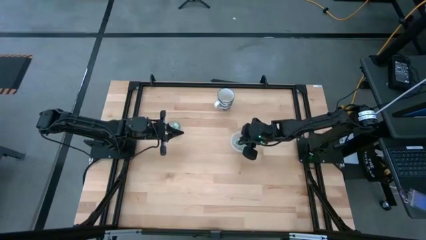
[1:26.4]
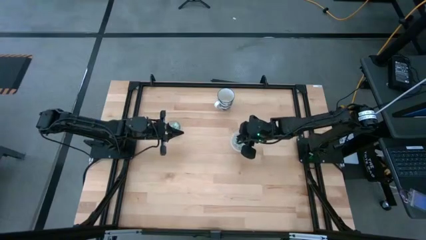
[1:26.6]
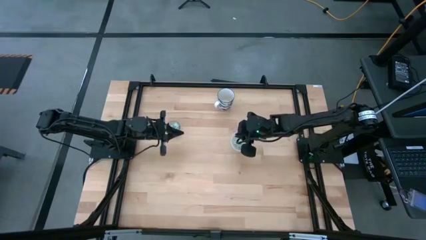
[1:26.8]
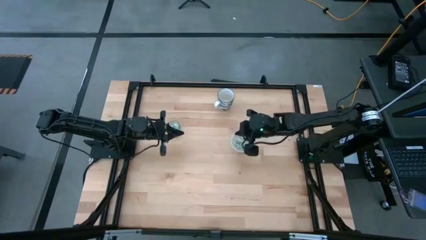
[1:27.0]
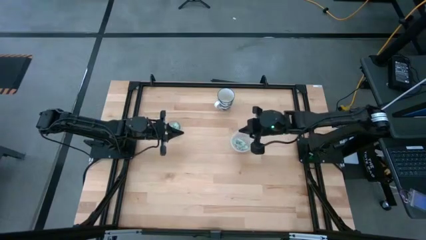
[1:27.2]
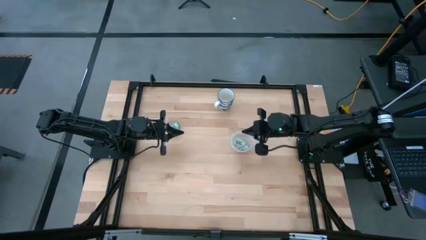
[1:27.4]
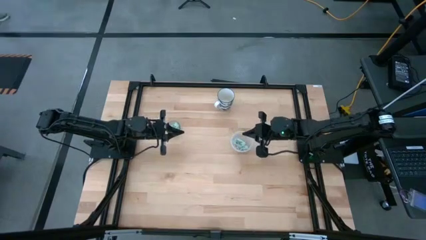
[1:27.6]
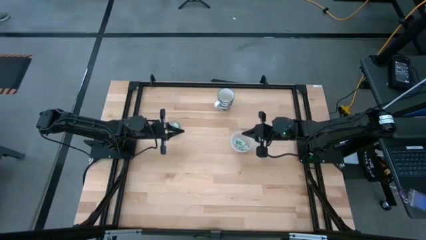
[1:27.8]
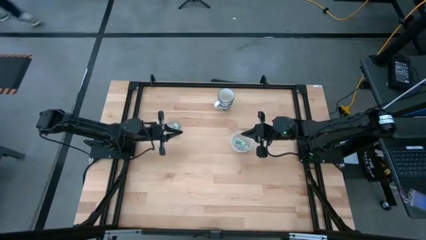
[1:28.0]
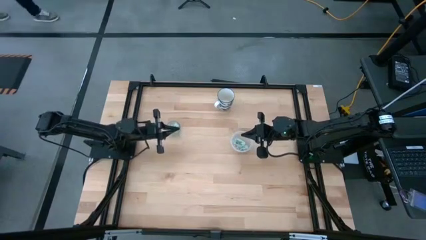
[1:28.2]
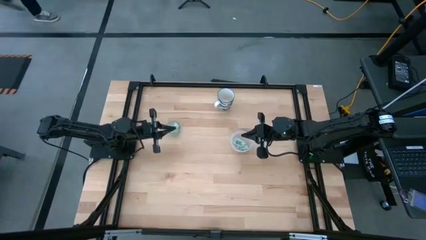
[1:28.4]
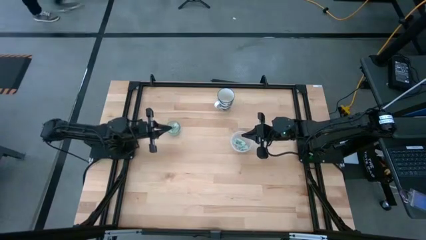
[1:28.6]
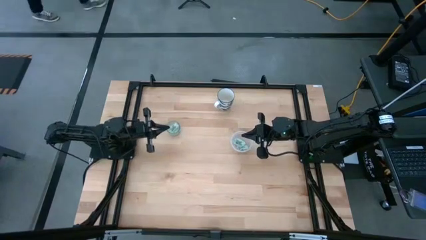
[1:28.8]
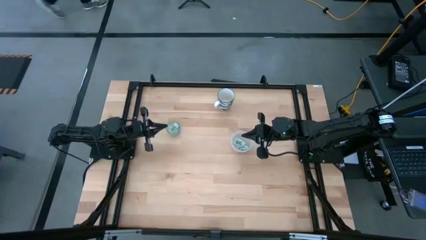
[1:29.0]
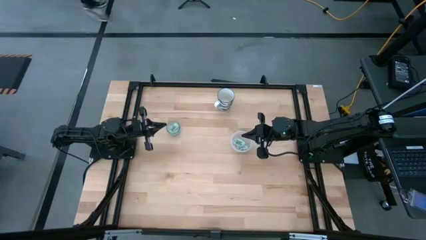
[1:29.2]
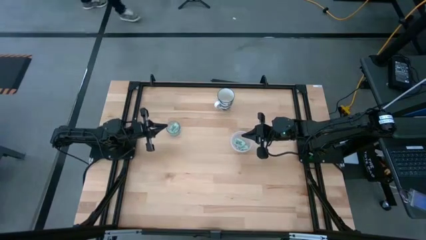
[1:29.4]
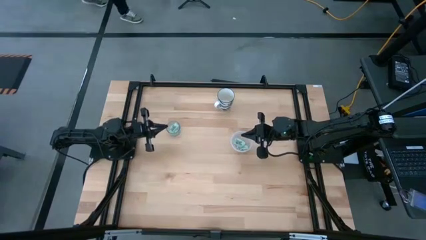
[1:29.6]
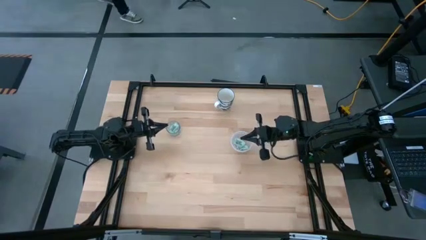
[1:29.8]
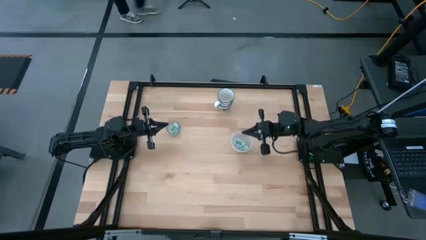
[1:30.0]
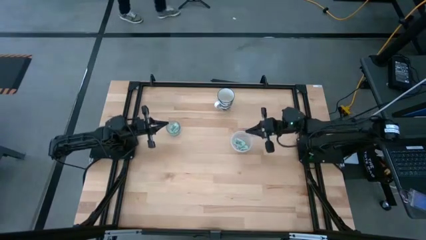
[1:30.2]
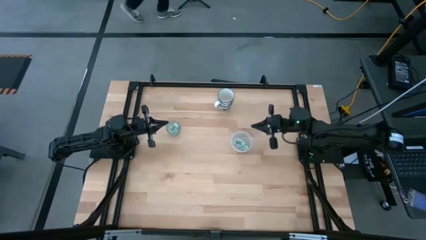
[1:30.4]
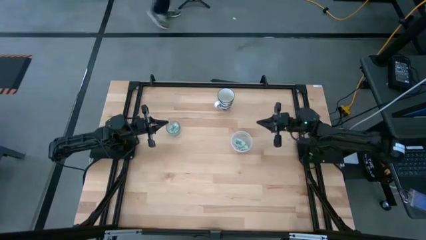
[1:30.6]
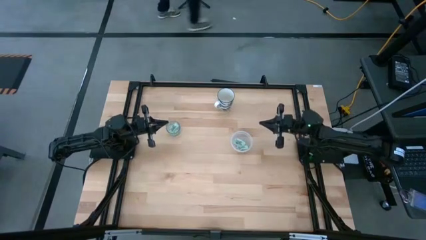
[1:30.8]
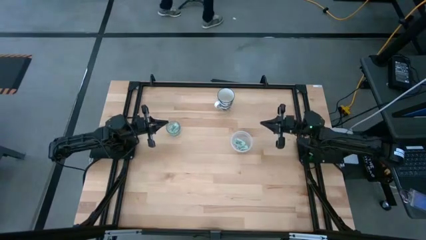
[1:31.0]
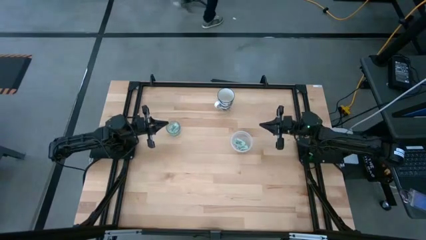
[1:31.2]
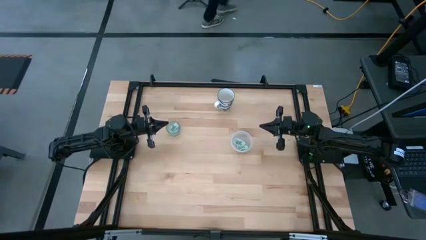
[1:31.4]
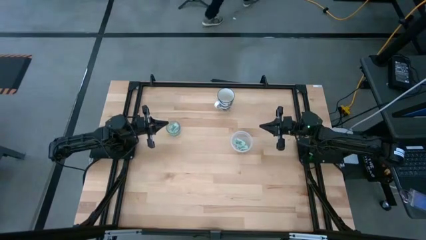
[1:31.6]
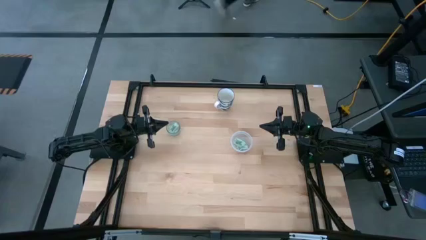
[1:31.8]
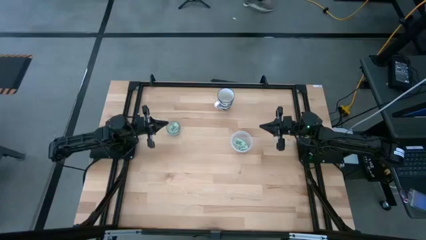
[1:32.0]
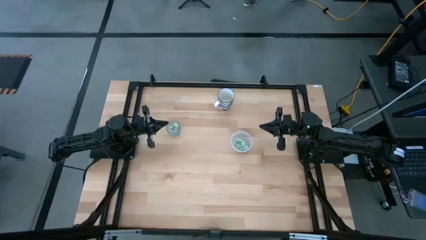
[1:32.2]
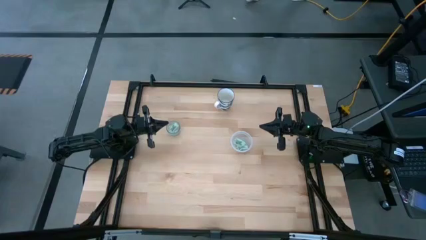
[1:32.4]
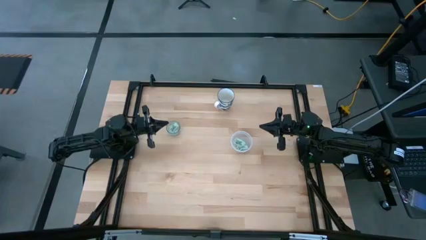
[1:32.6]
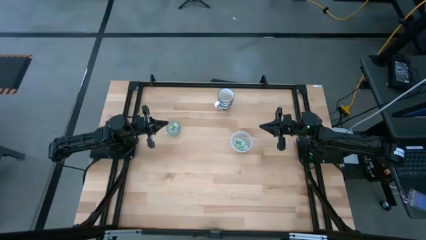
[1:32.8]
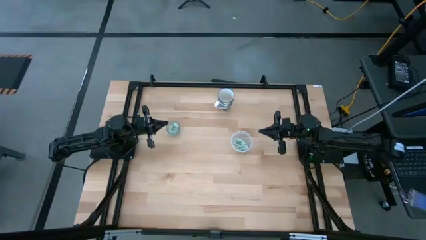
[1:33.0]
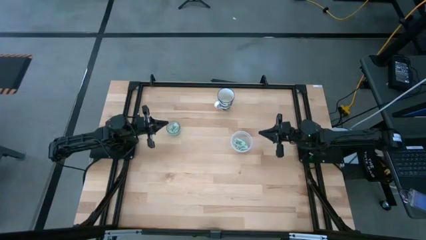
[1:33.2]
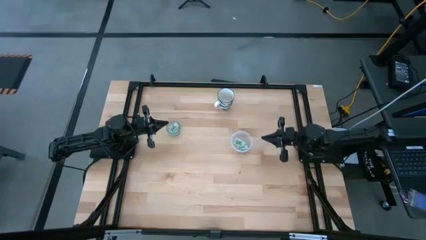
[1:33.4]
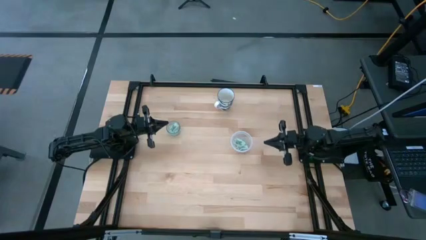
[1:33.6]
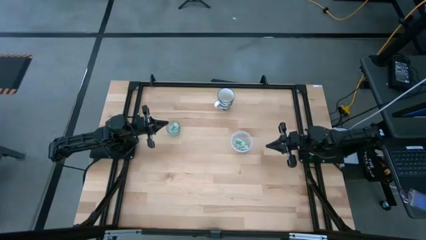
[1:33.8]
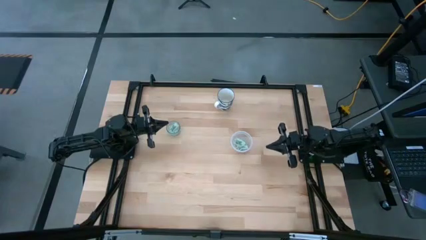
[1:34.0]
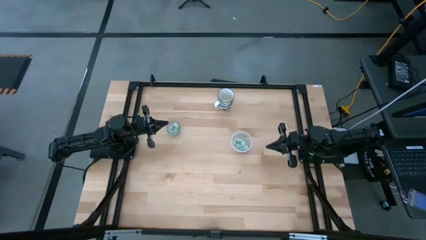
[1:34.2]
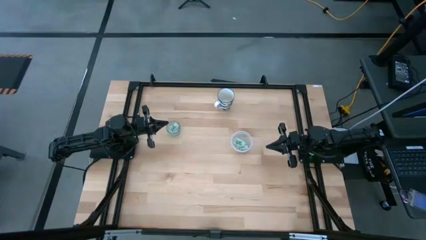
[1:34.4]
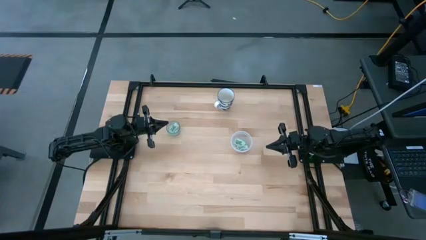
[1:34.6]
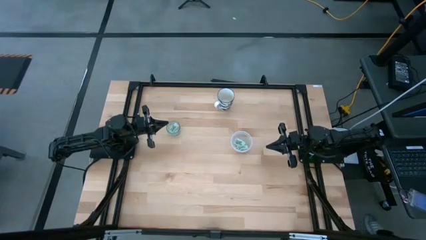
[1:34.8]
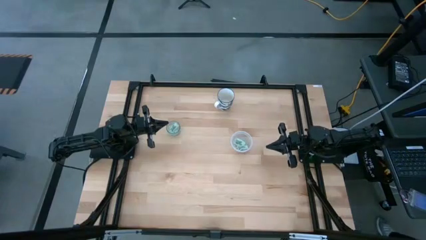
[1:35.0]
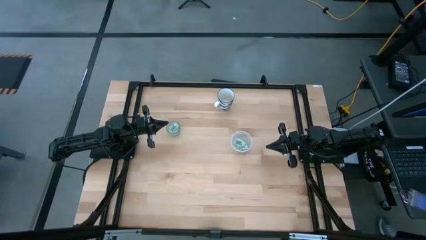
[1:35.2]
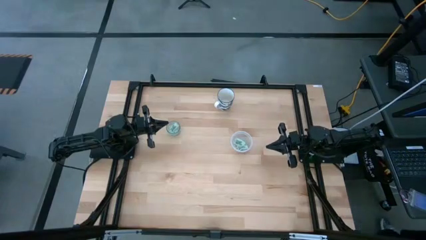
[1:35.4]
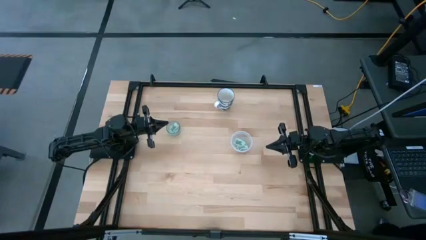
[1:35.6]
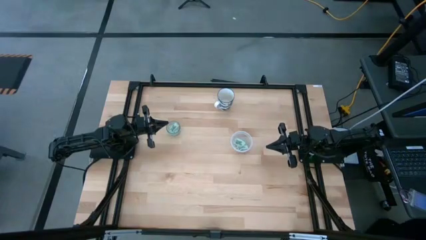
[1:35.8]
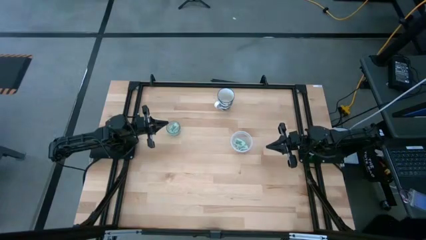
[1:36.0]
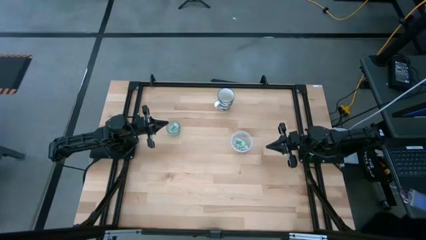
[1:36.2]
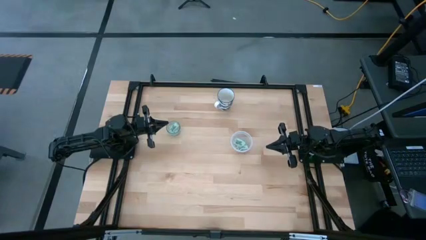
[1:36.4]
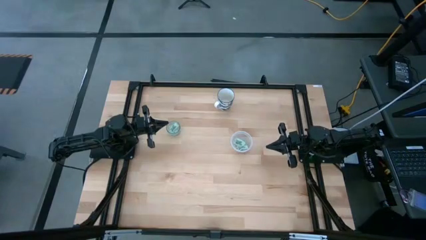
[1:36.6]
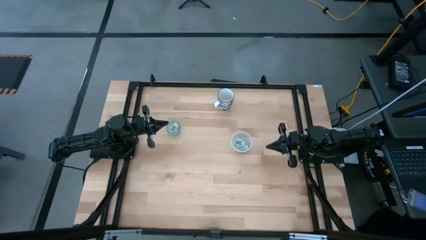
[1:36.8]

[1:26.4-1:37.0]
Task: Pick and place Stevia / Truvia into bins
Return to Home Position

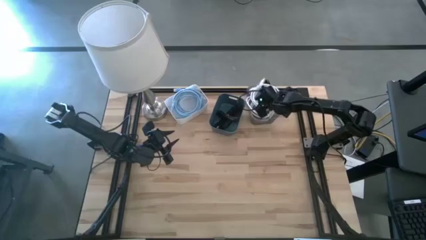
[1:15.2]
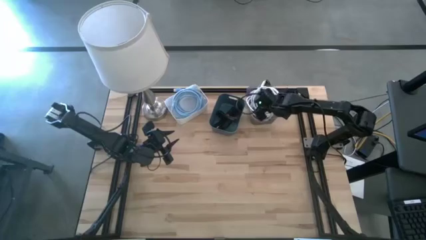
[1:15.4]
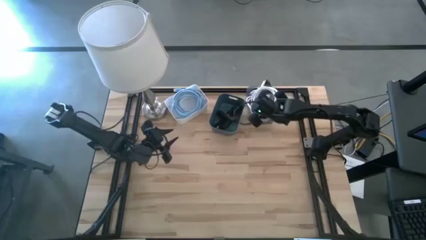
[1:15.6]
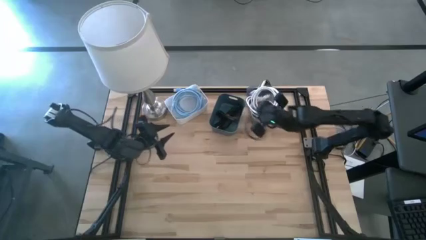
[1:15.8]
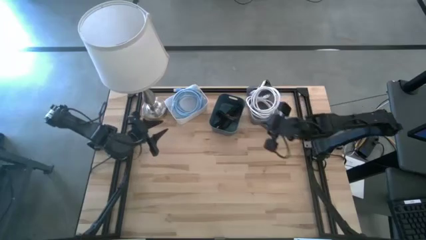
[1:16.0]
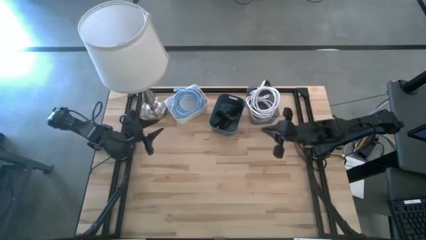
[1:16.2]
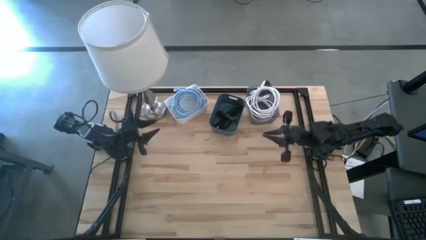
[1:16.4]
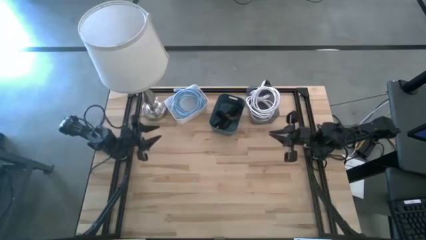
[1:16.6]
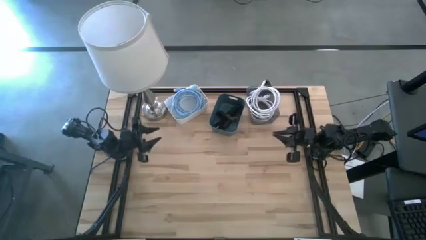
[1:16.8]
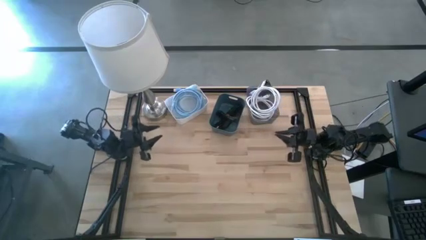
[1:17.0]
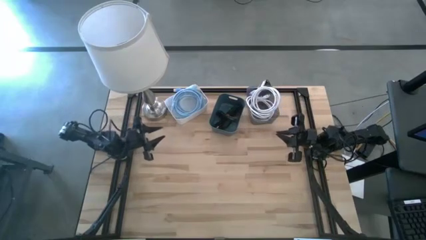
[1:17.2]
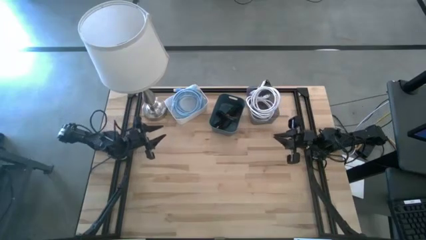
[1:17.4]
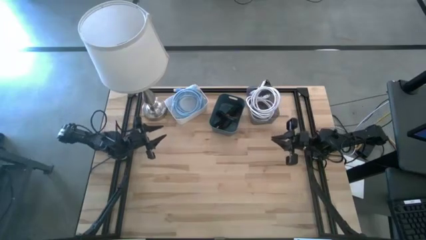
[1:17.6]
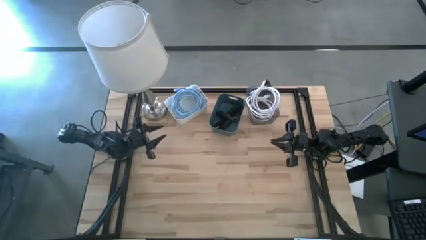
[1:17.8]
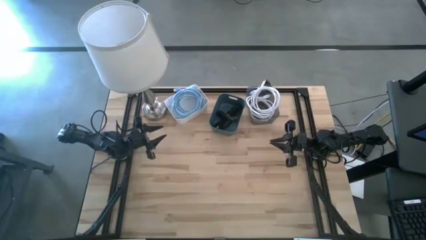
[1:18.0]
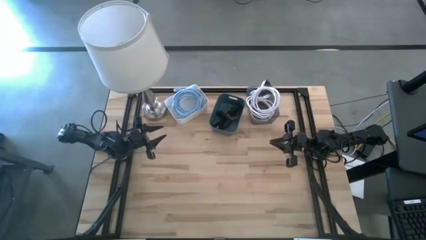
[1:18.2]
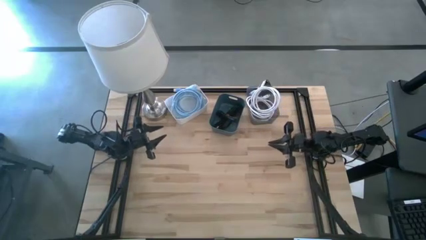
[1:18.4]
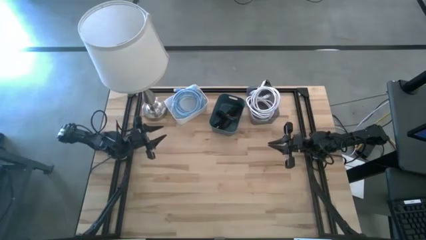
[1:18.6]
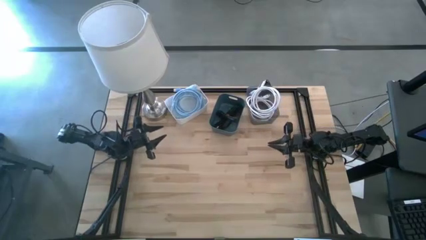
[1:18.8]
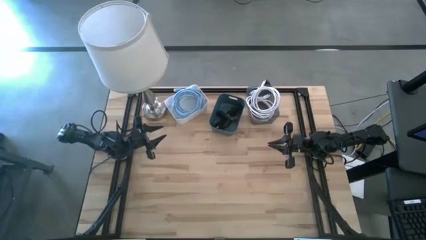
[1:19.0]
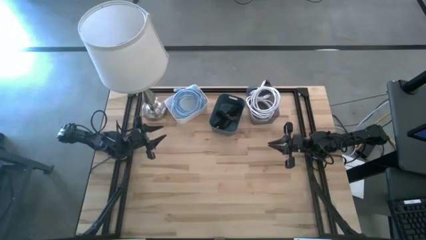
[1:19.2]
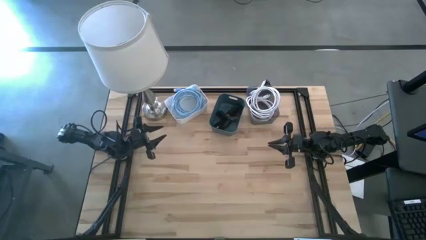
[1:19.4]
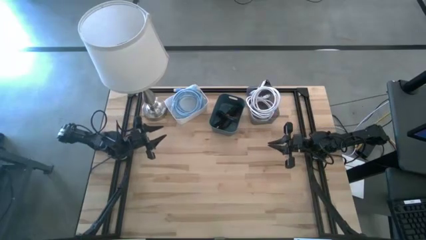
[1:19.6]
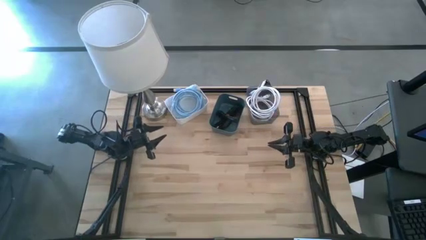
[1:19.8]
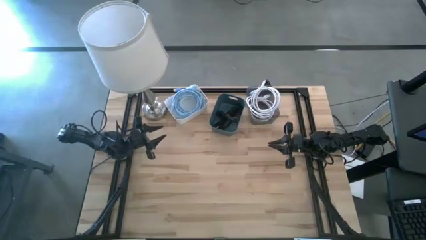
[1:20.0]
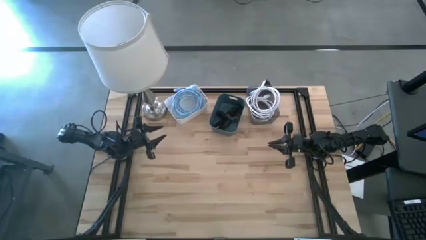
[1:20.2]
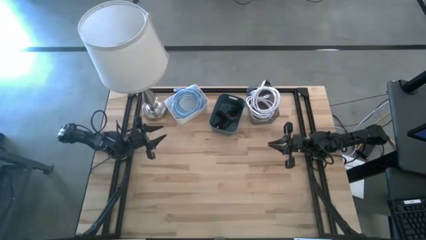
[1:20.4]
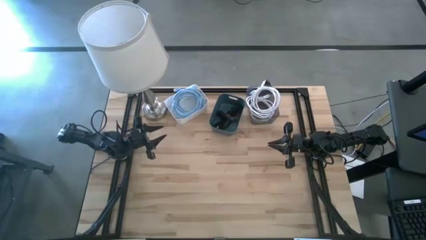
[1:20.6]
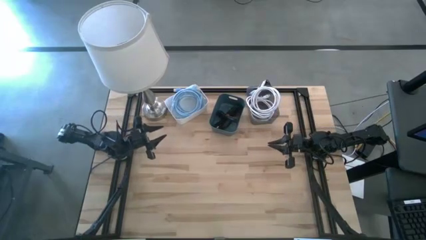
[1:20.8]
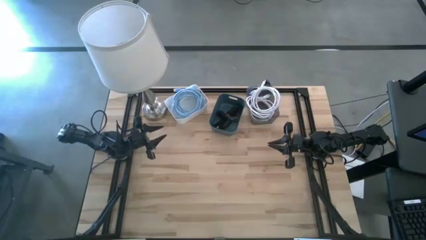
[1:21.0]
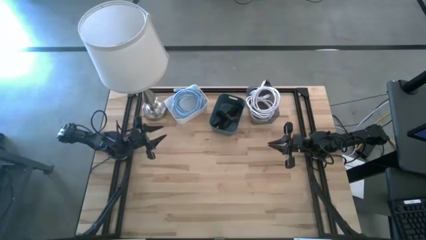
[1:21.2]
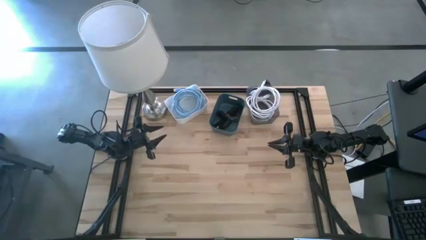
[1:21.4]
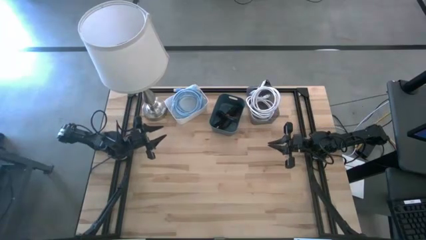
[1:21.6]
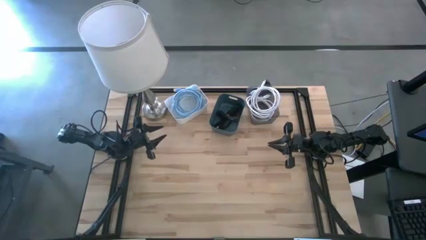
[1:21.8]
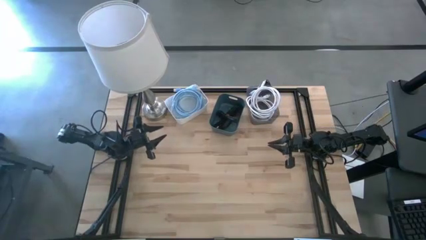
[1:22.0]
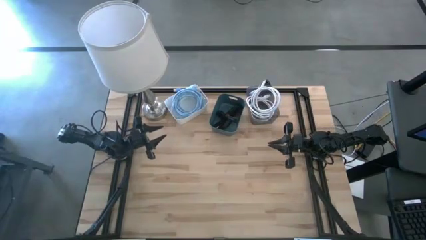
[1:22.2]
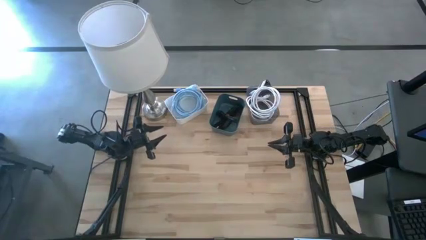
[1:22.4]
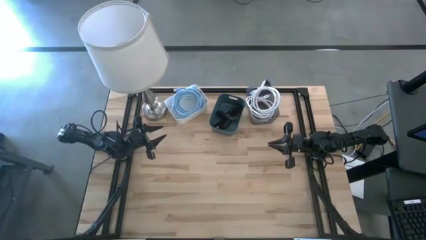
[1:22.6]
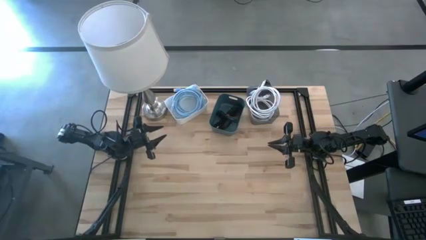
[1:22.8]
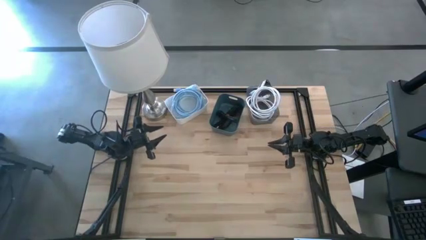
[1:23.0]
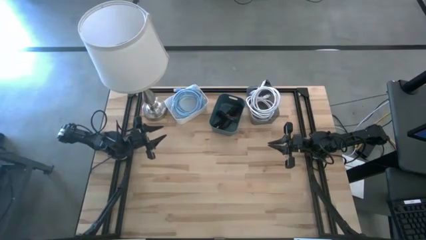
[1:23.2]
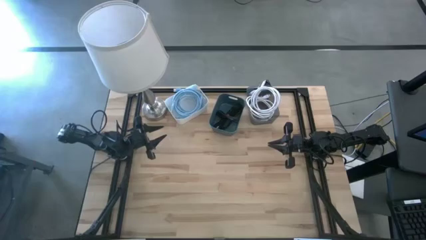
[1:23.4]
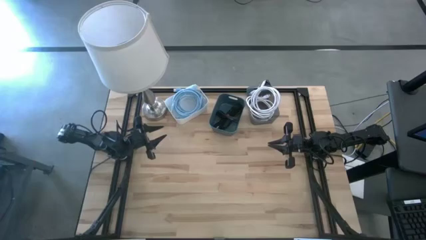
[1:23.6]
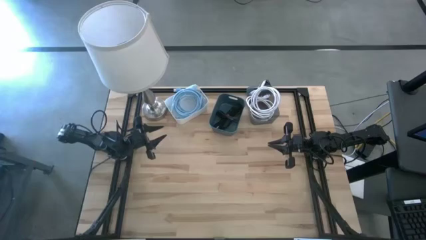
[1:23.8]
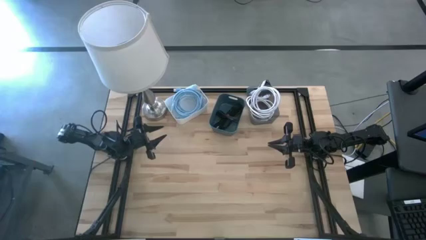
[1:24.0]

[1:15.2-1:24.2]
Task: Pick & Place USB Port
Return to Home Position
